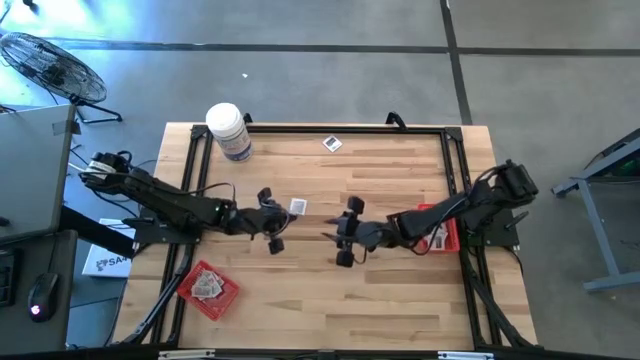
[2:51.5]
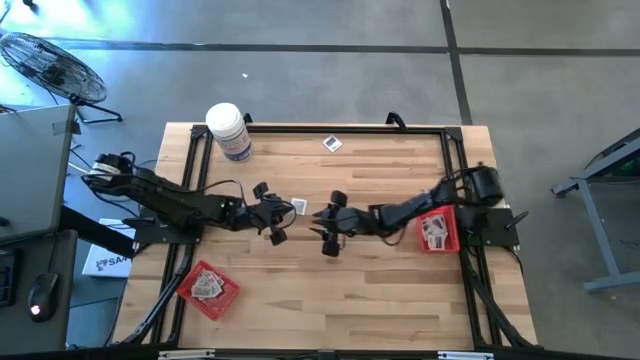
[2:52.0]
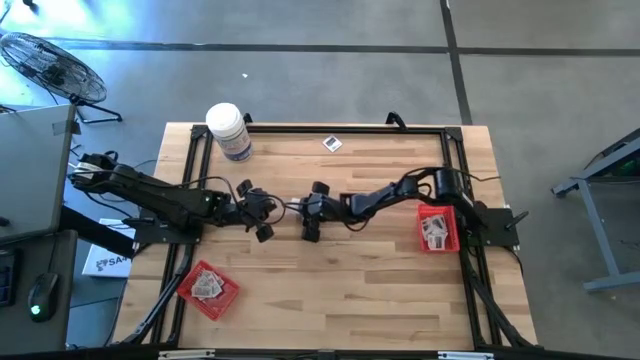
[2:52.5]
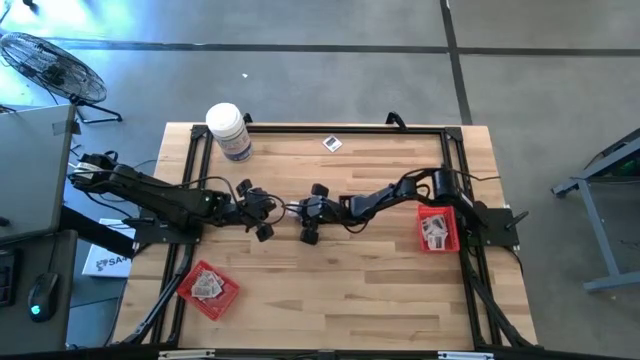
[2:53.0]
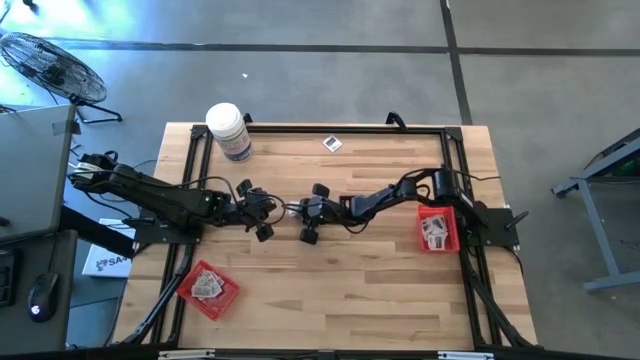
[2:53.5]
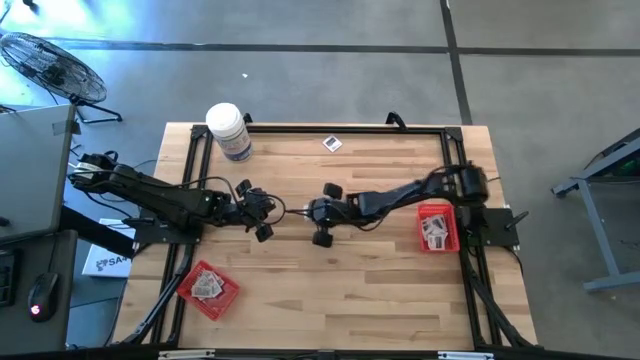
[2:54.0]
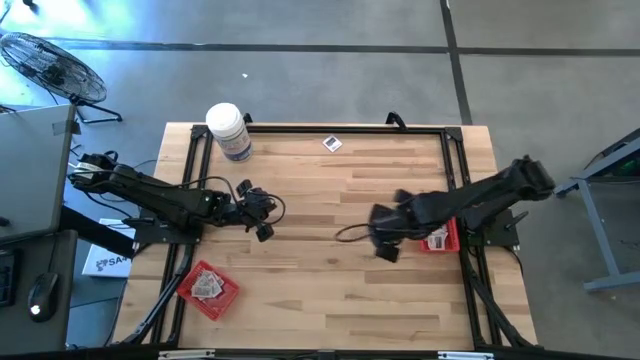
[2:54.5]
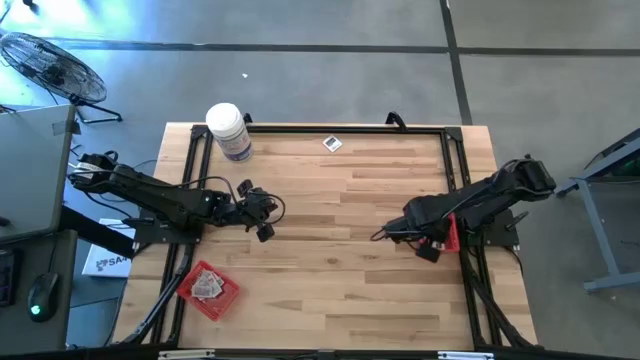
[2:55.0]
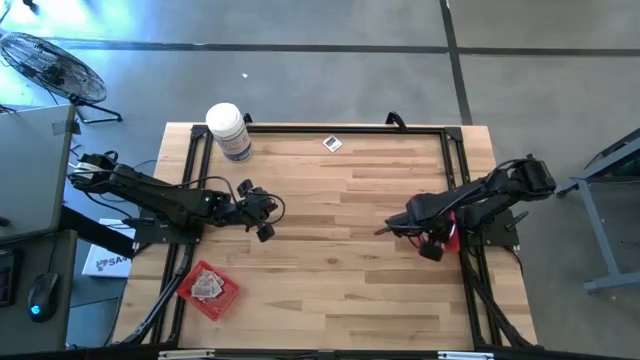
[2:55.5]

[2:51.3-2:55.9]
Task: Pick & Place First Aid Supplies
Put the towelette pack into the right red bin

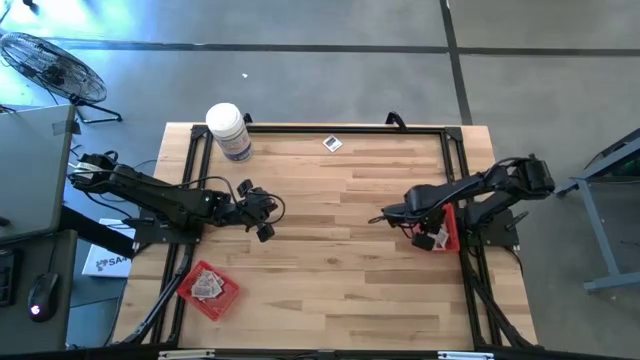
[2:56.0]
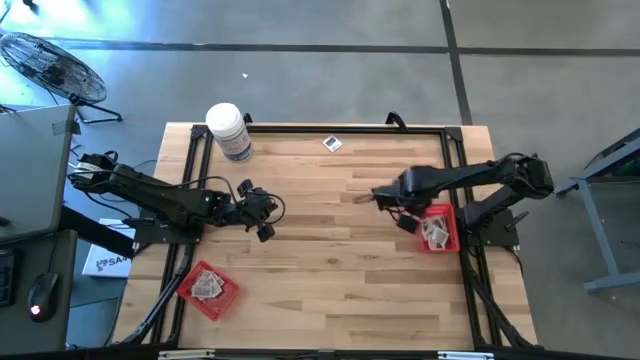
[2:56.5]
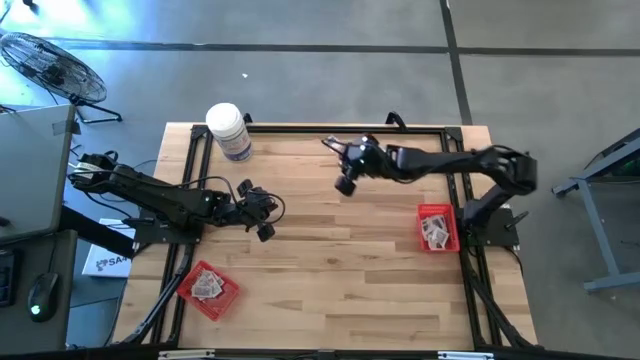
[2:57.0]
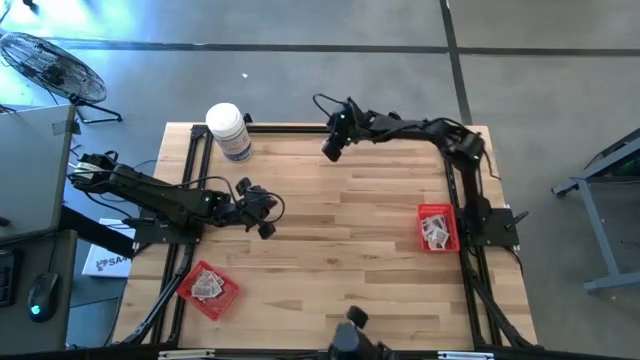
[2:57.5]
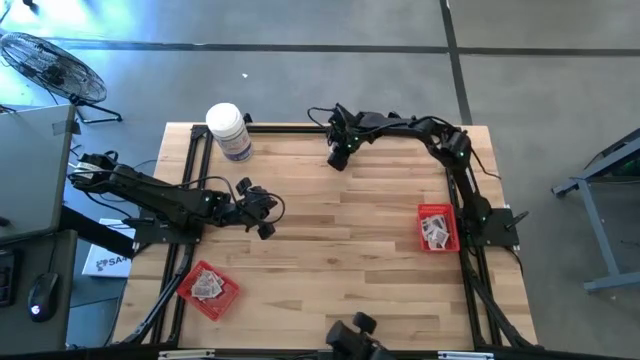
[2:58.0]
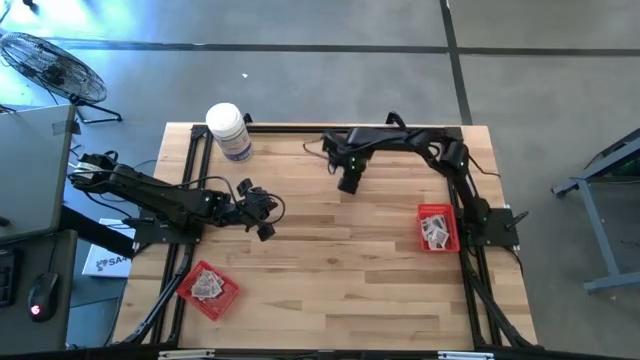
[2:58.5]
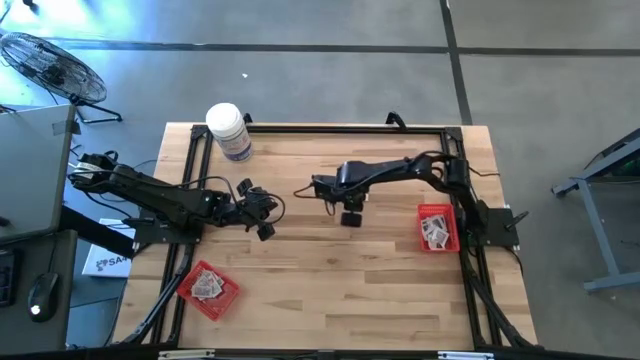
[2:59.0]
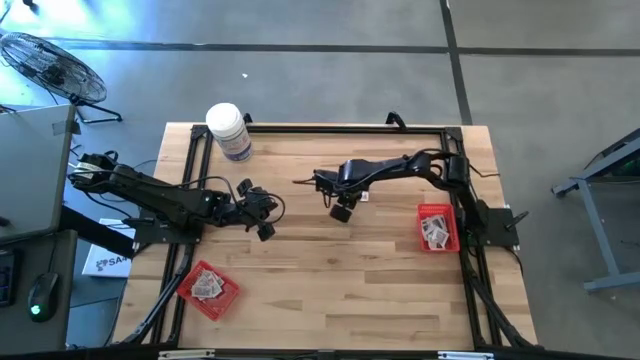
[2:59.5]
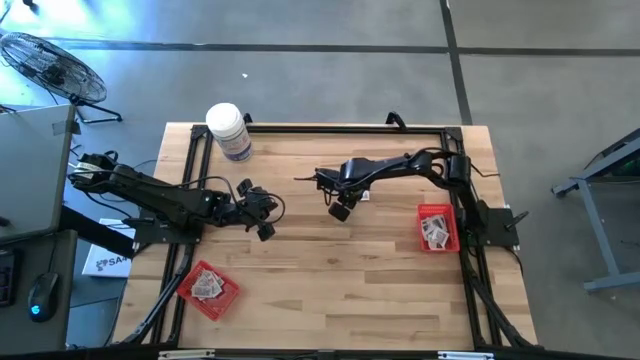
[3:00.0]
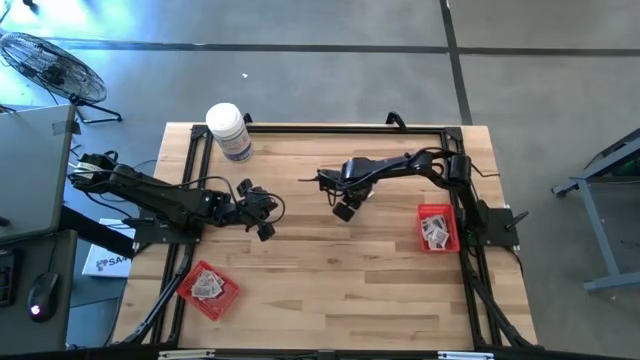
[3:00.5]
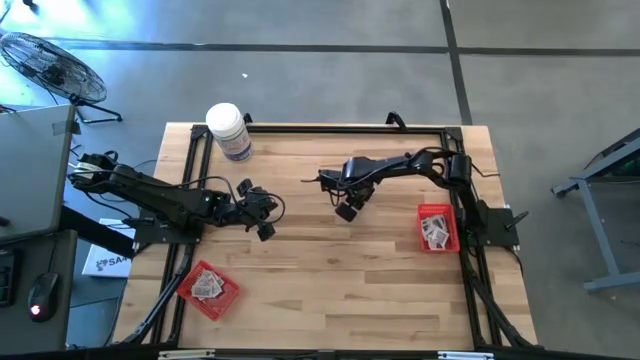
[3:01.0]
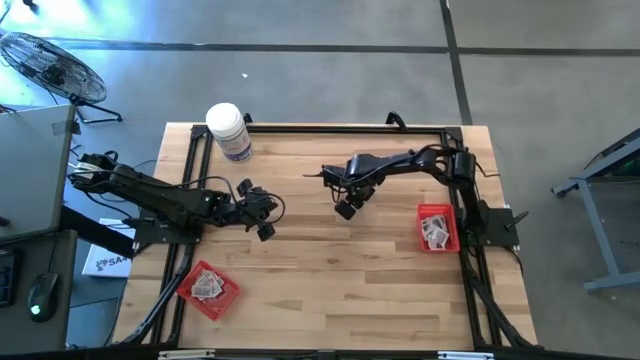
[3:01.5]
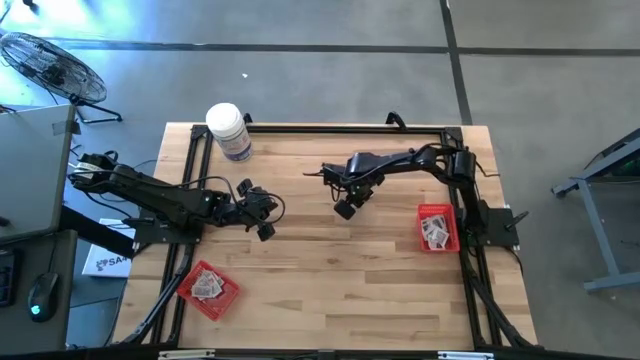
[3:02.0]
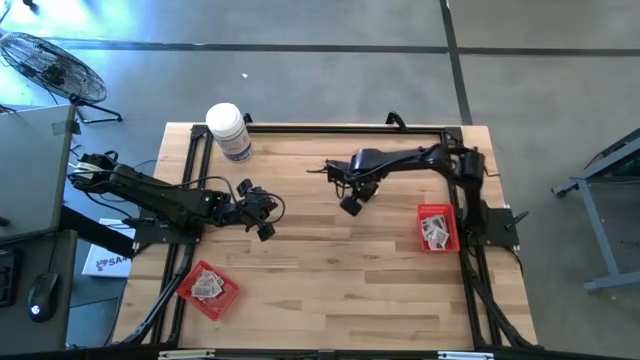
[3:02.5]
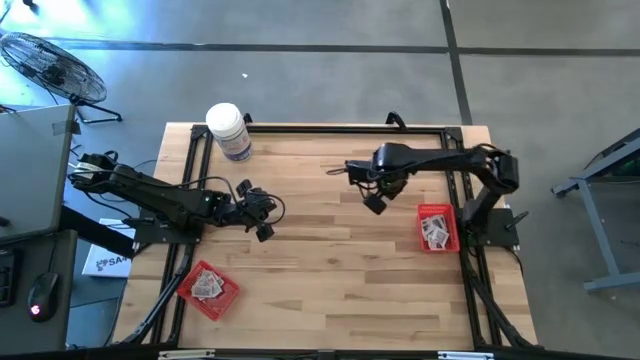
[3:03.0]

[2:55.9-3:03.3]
Put the towelette pack into the right red bin

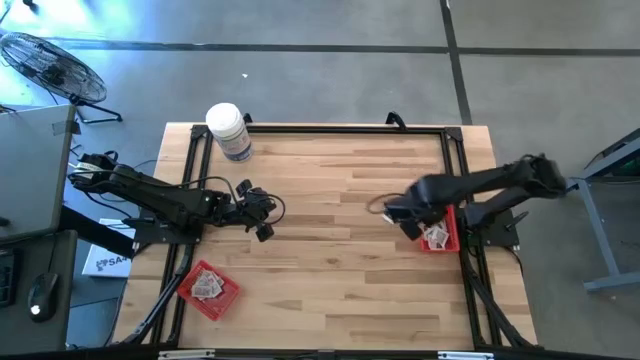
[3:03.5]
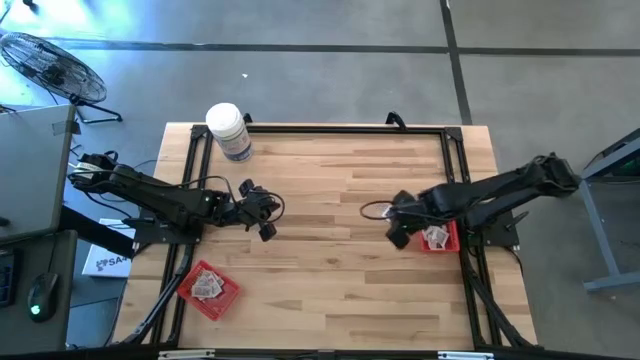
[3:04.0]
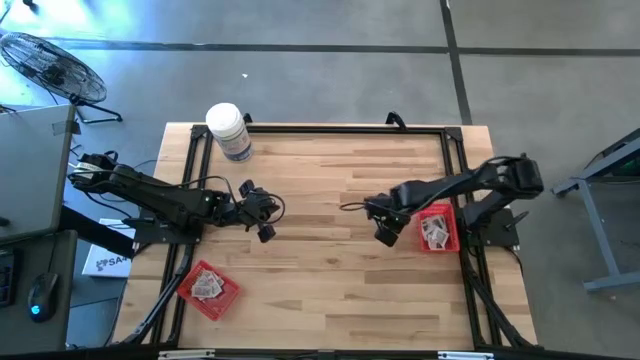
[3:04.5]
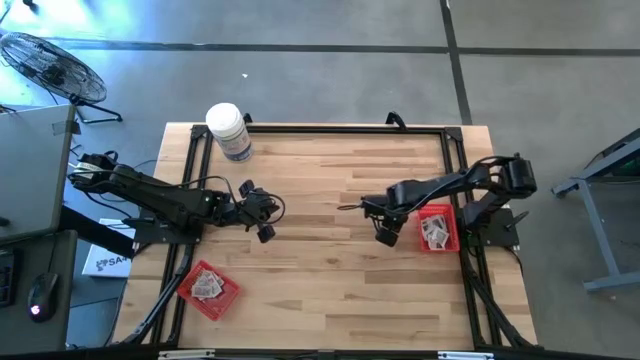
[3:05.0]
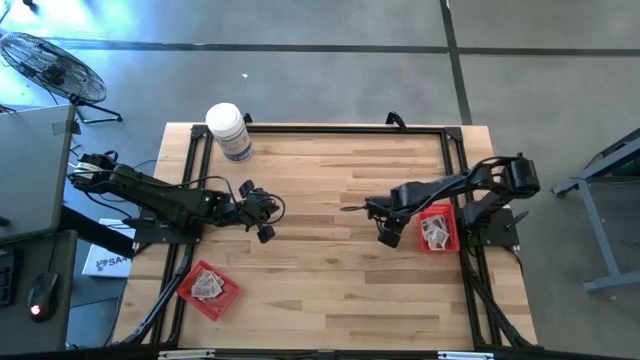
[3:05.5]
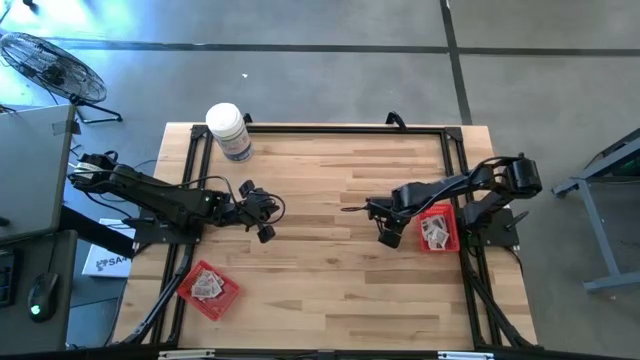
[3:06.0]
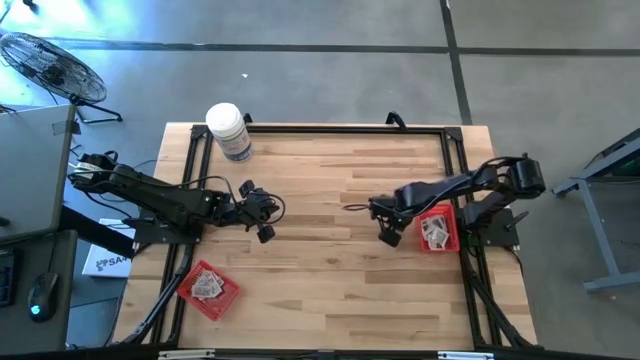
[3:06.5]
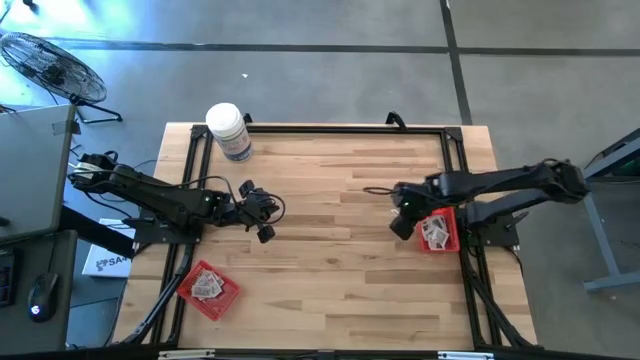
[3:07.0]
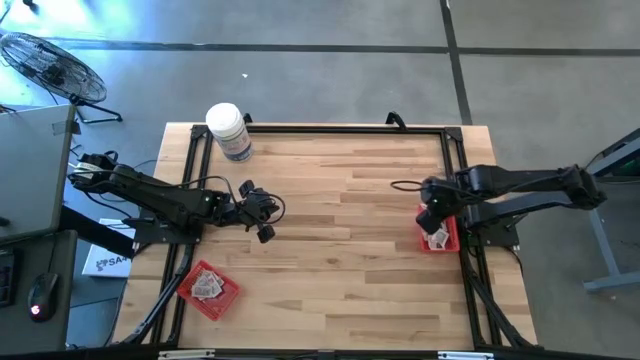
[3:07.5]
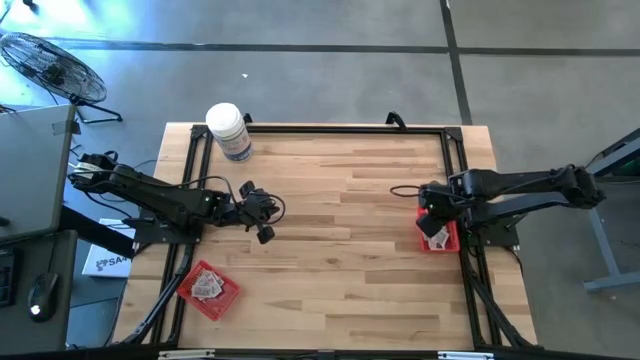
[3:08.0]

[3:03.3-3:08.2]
Put the towelette pack into the right red bin

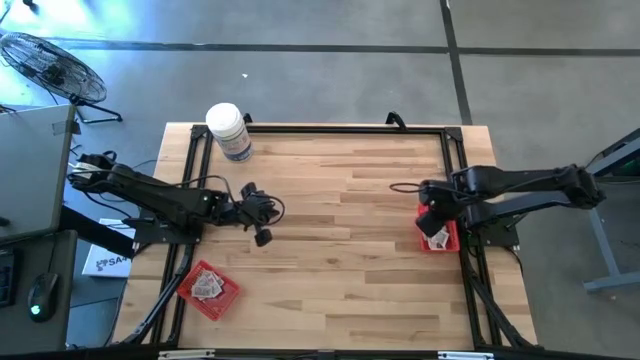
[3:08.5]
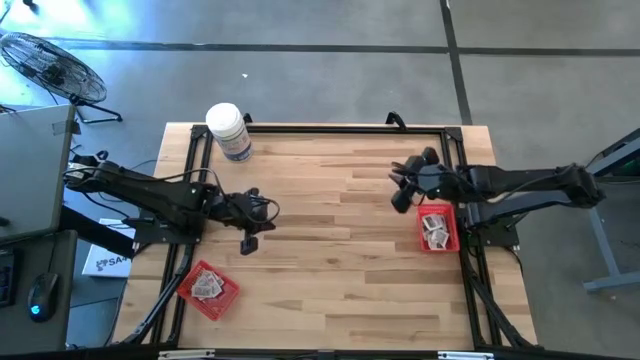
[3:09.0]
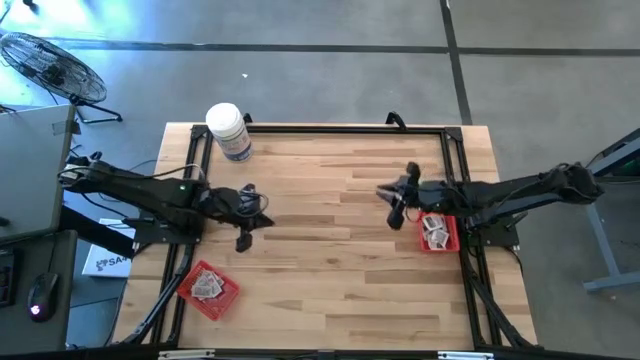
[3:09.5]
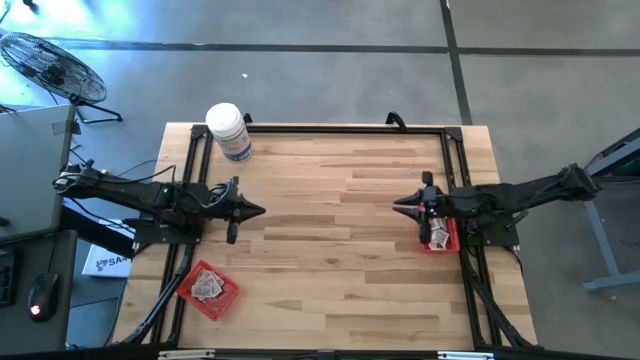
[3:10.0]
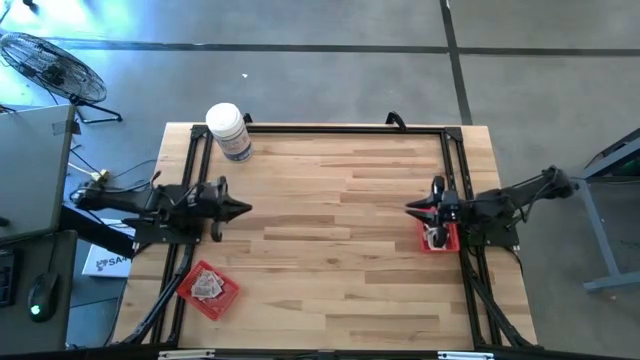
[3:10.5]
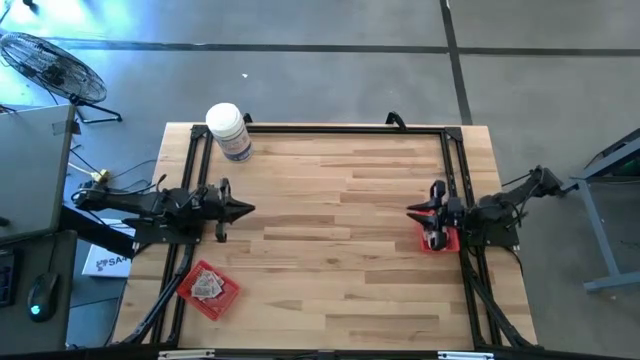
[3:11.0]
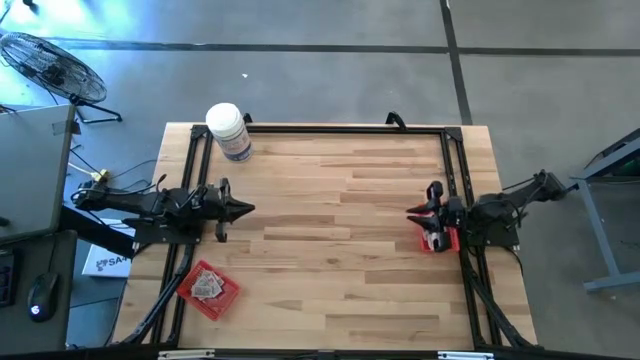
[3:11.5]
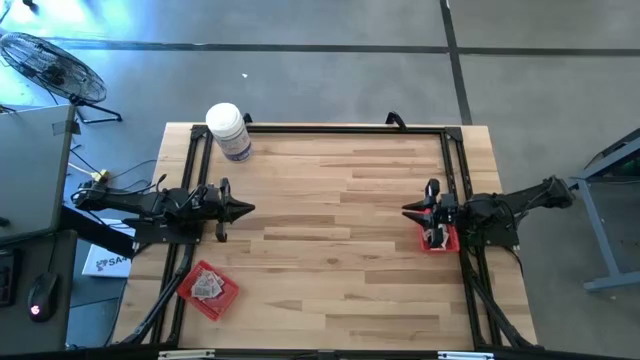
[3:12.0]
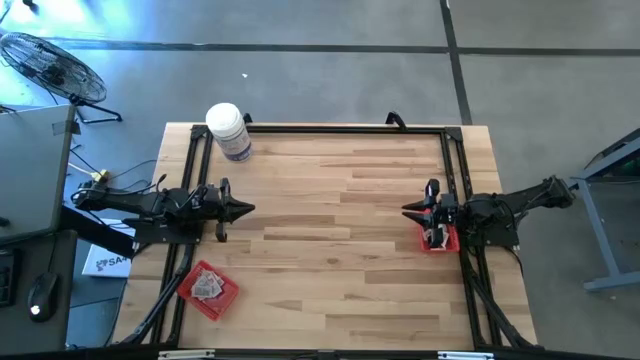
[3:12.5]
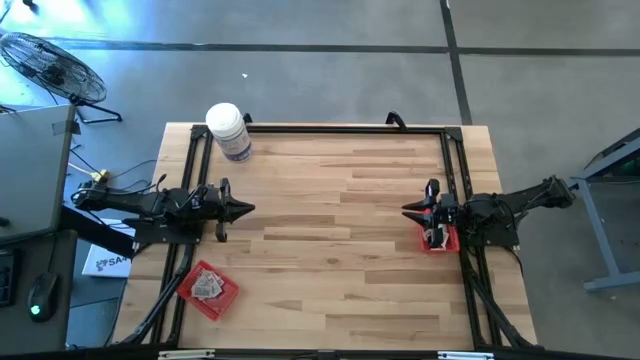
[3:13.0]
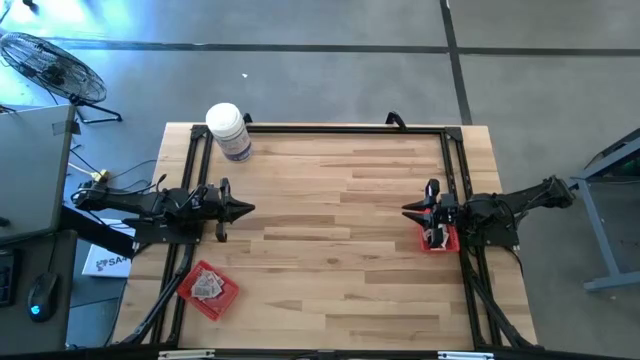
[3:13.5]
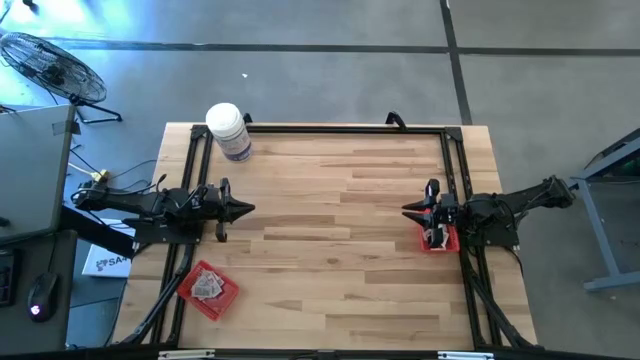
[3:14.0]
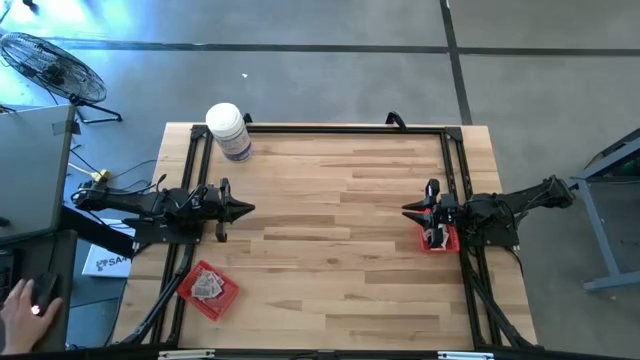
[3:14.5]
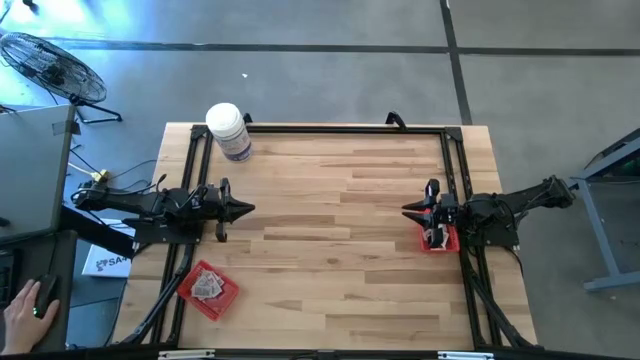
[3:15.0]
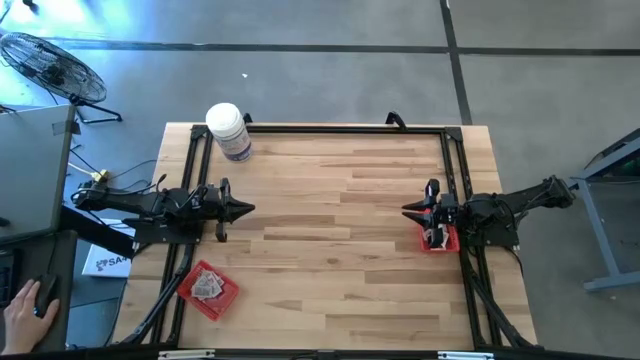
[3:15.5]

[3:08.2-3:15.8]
Return to Home Position
